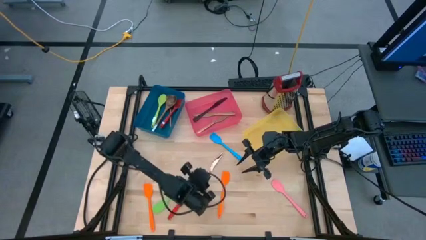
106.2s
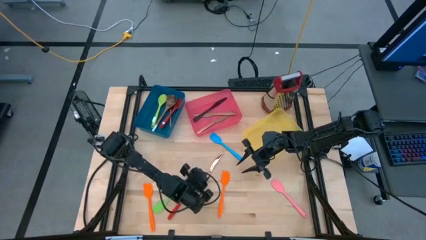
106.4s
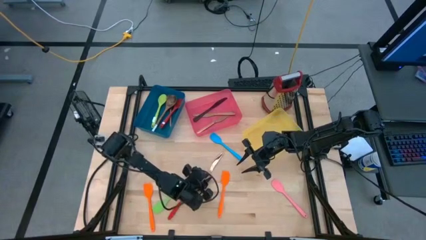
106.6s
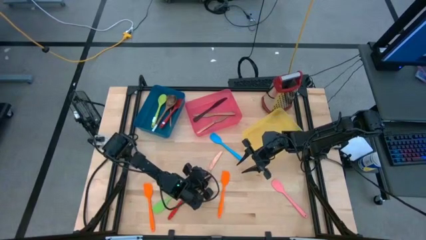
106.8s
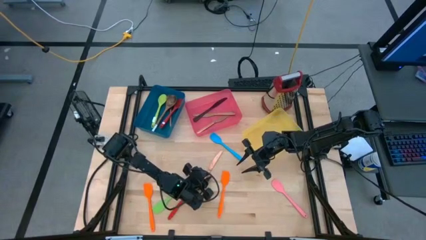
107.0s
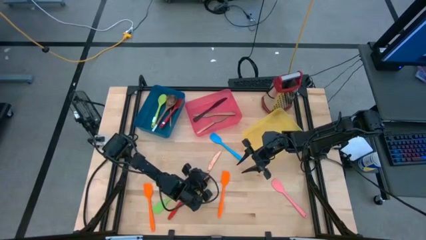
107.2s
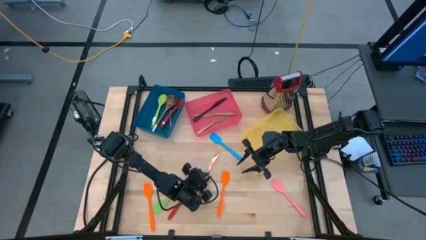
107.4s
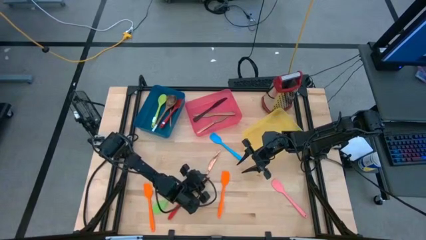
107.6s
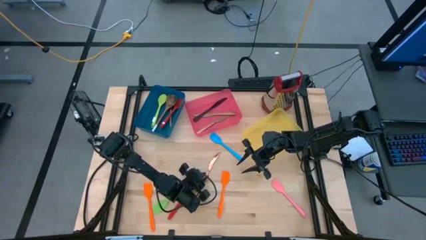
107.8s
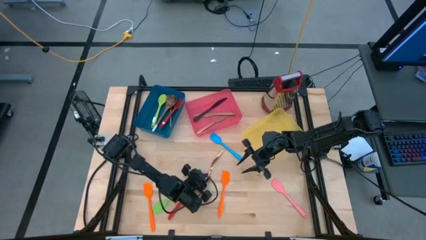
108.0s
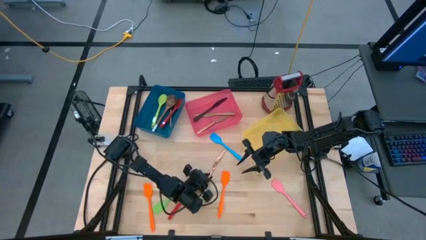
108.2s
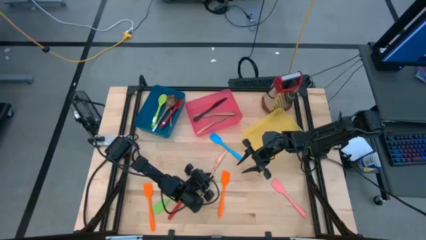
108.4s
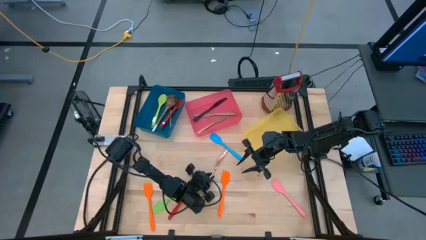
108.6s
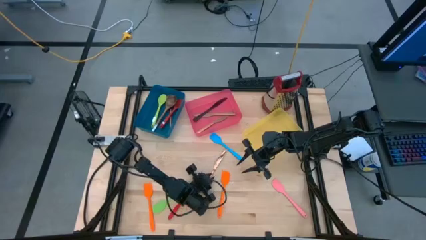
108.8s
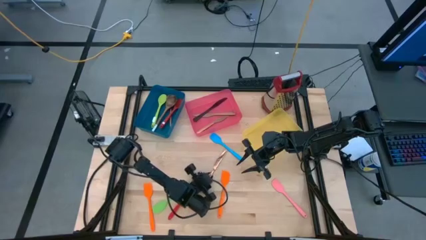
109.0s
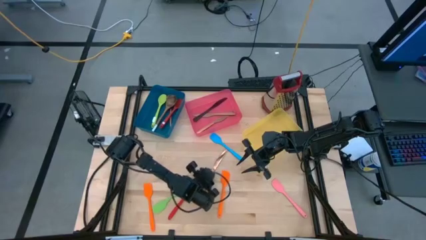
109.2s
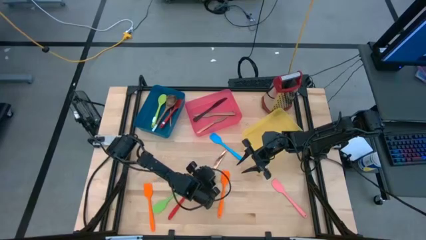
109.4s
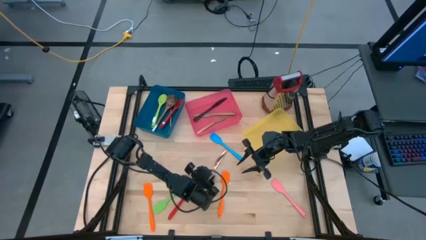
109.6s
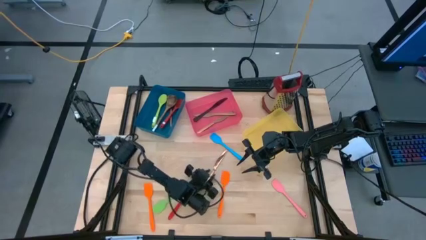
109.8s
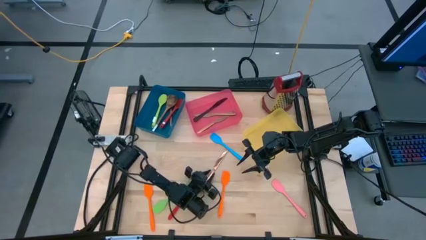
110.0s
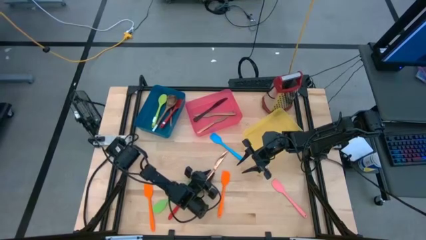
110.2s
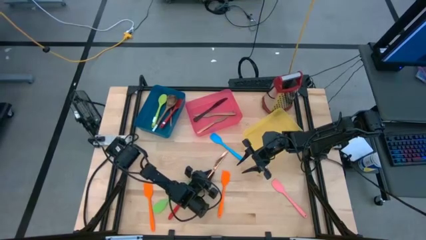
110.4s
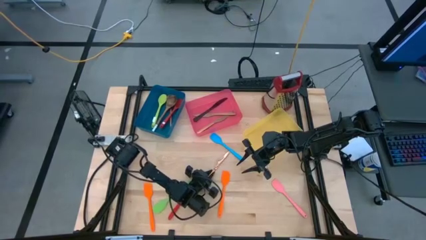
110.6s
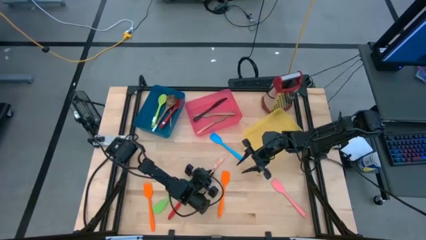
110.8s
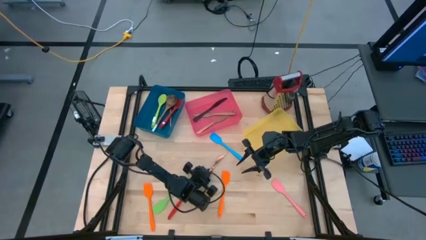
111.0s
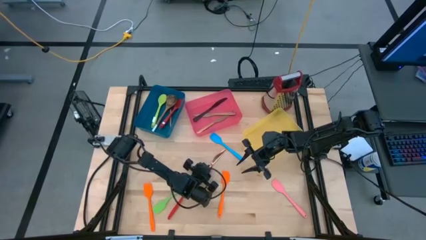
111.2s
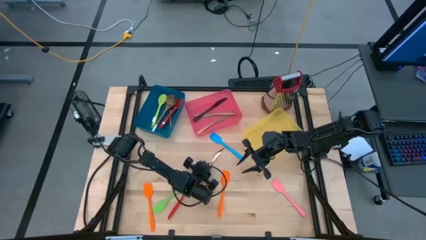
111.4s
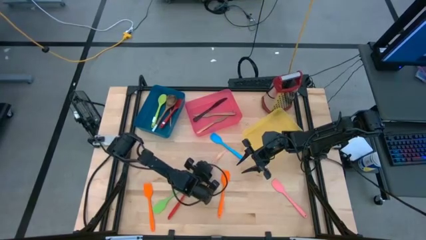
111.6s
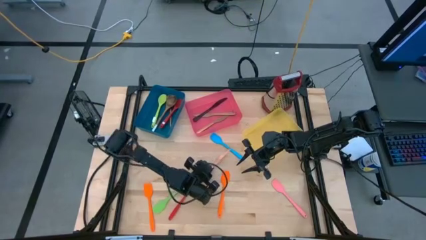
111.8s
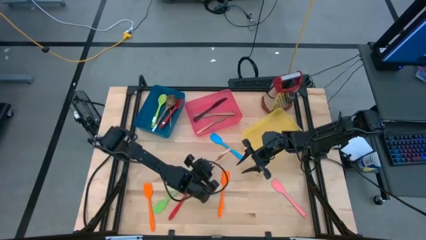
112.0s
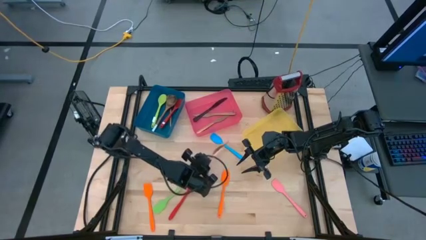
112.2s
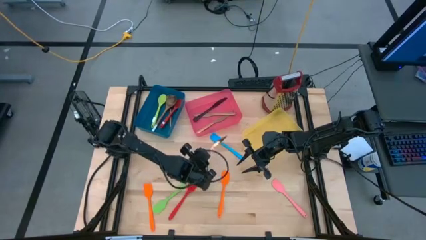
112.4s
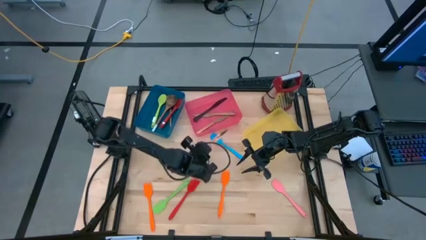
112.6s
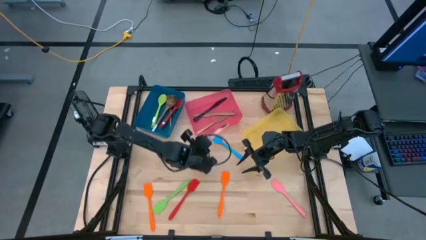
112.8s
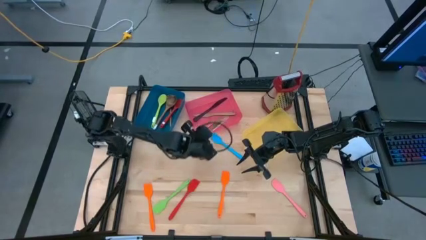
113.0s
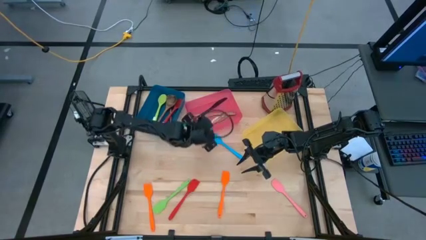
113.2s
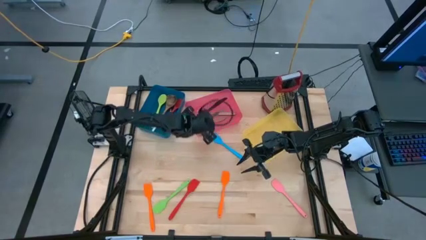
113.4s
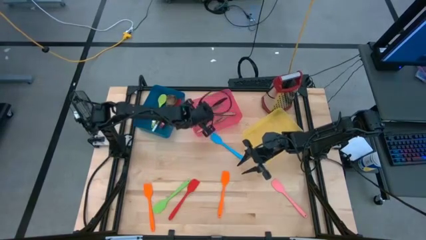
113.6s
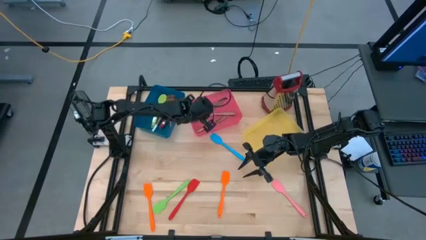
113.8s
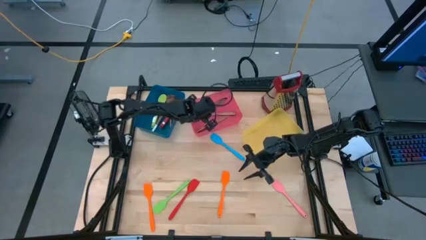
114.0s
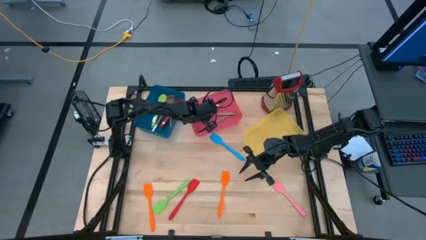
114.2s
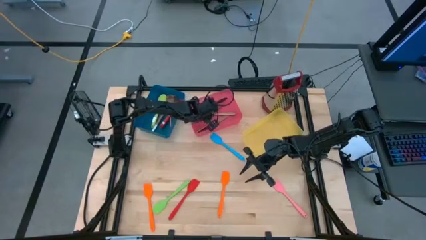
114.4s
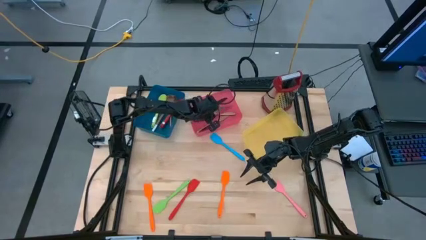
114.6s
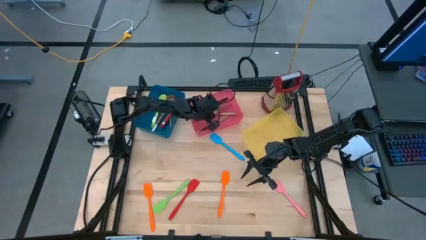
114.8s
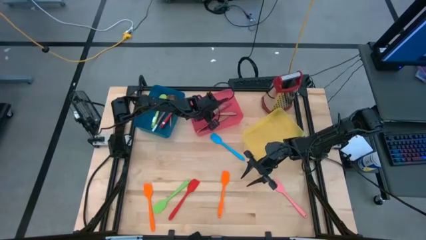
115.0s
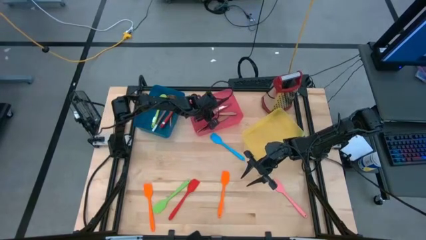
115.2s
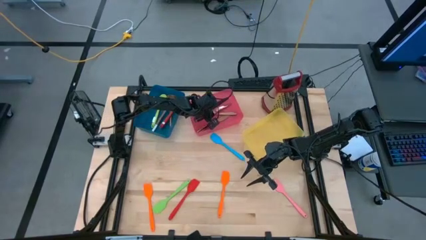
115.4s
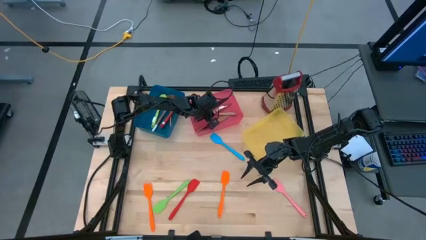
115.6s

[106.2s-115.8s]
Task: Pick & Place Kitchen Items
Put the gold knife into the pink bin

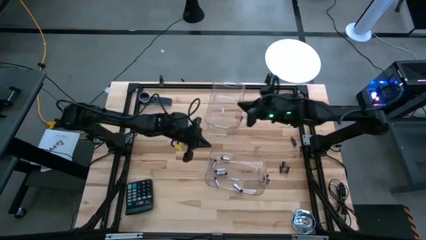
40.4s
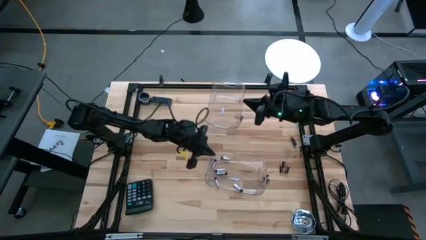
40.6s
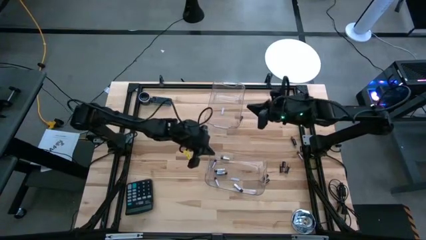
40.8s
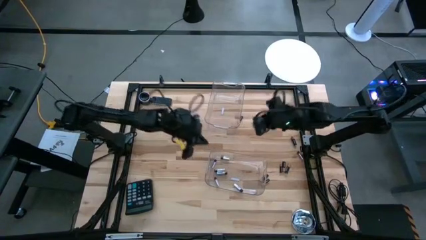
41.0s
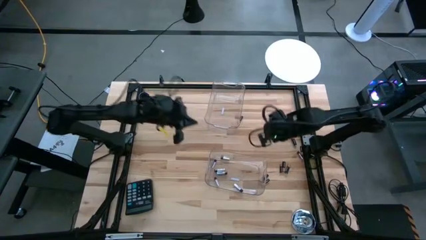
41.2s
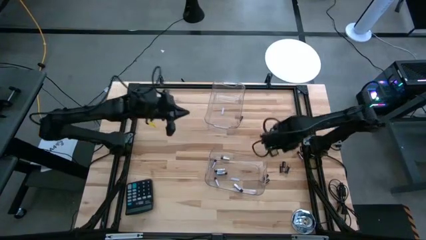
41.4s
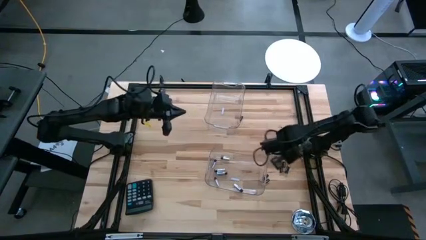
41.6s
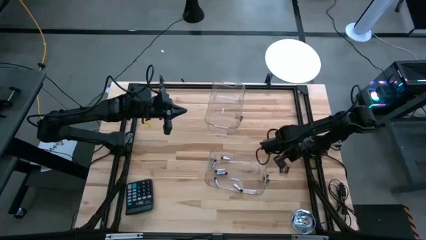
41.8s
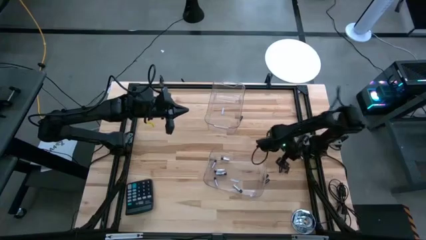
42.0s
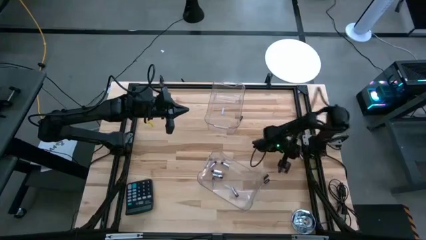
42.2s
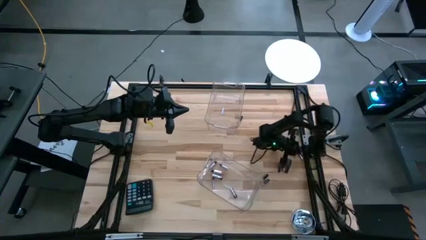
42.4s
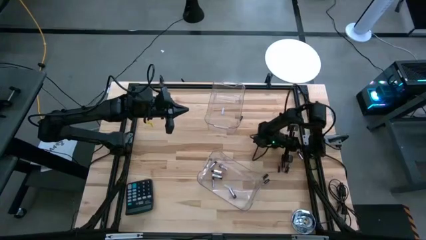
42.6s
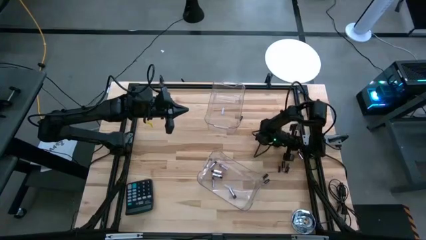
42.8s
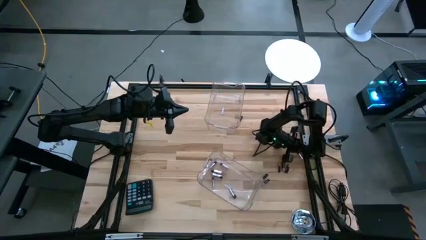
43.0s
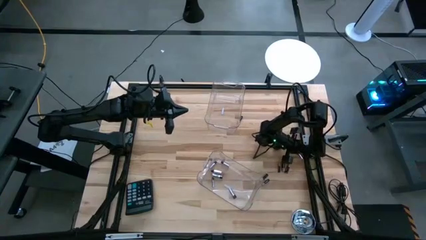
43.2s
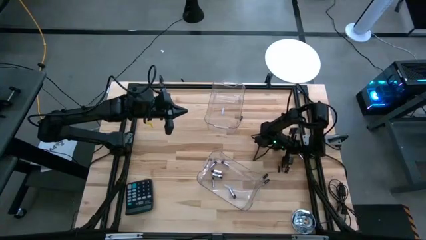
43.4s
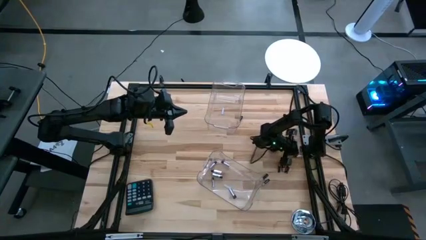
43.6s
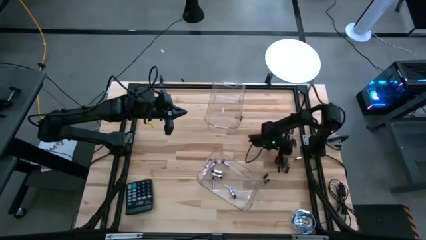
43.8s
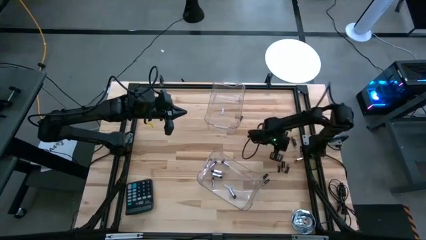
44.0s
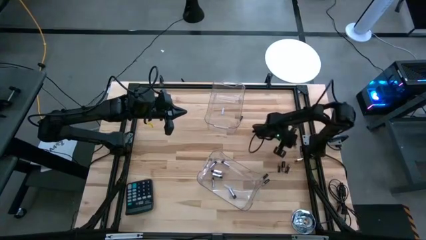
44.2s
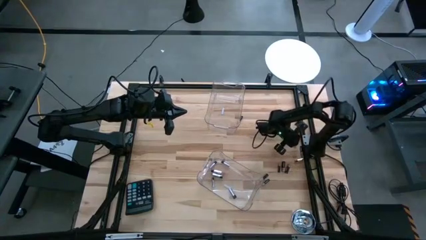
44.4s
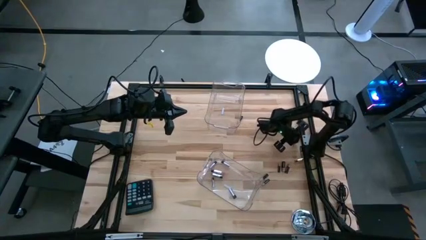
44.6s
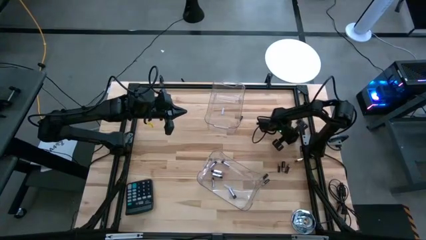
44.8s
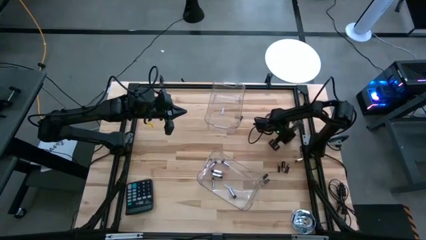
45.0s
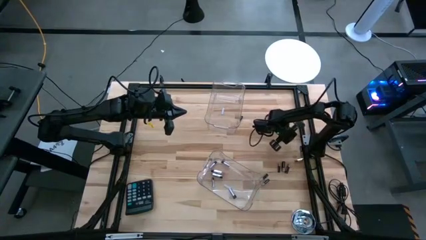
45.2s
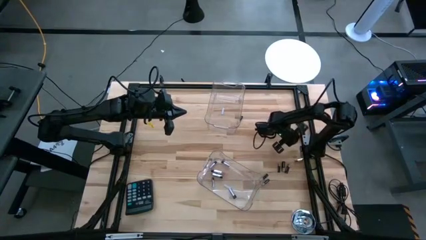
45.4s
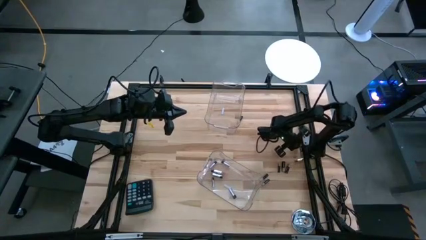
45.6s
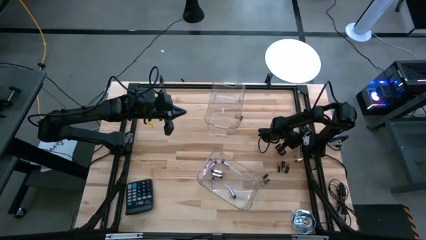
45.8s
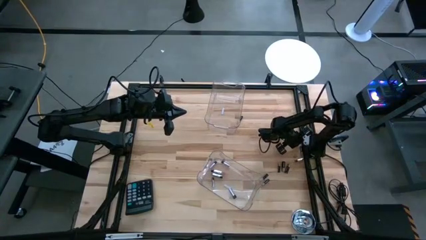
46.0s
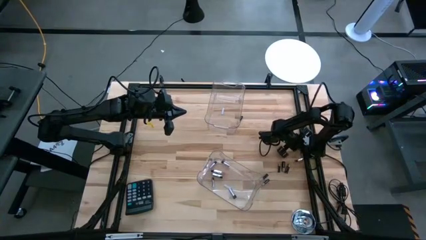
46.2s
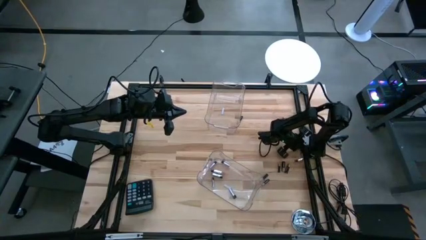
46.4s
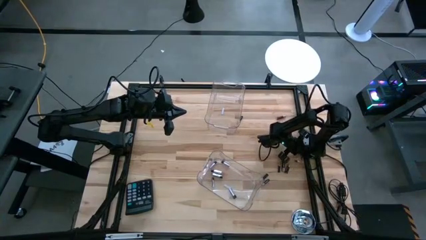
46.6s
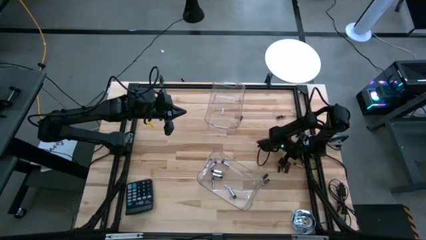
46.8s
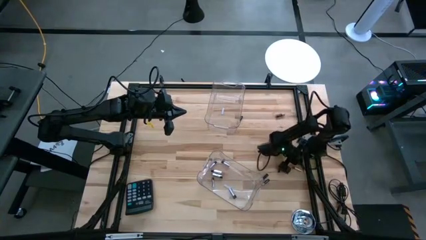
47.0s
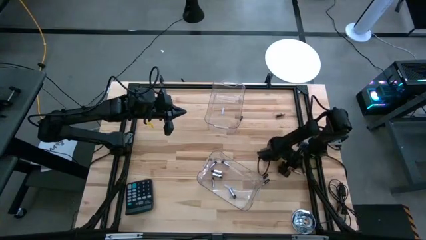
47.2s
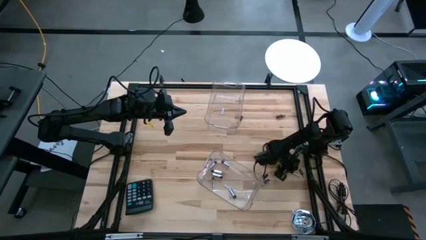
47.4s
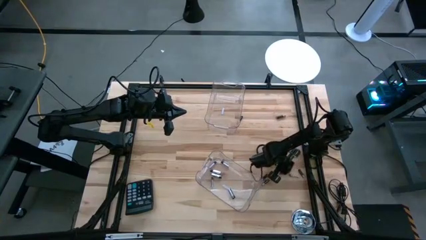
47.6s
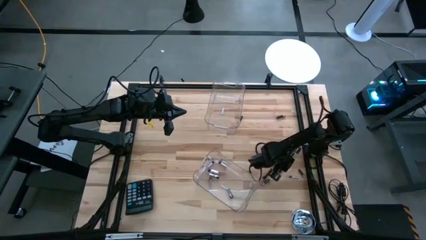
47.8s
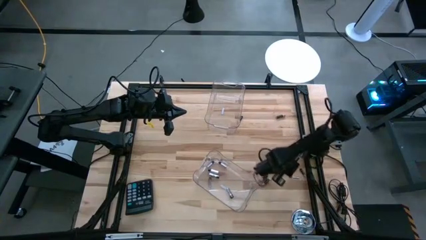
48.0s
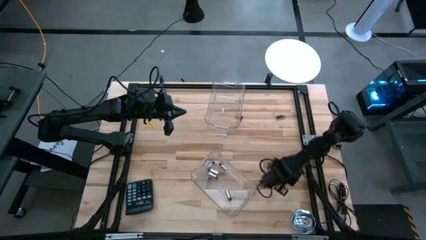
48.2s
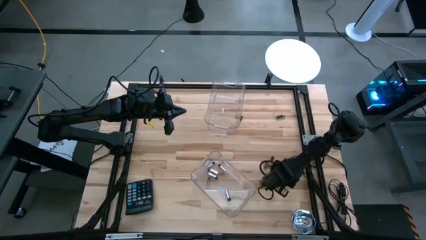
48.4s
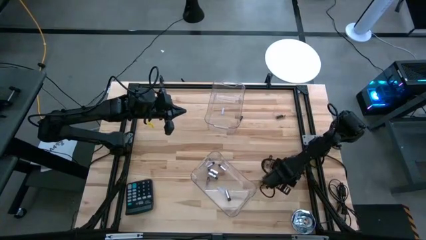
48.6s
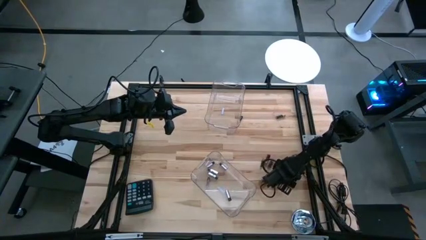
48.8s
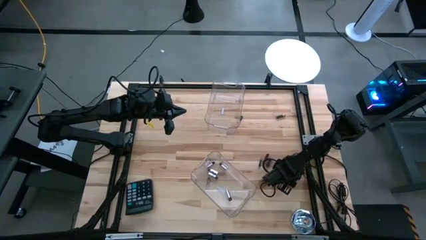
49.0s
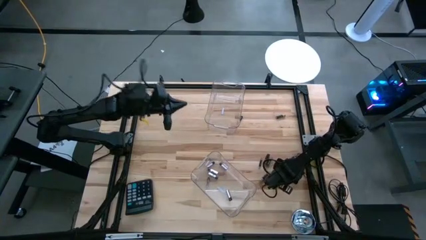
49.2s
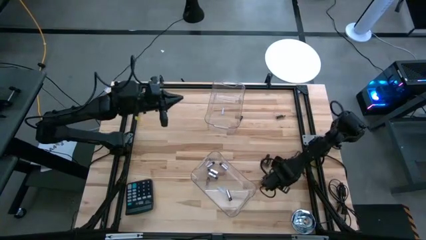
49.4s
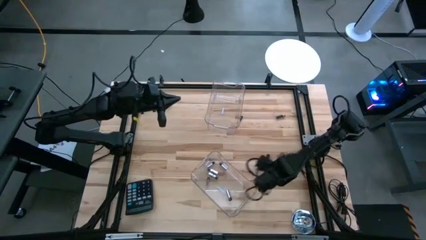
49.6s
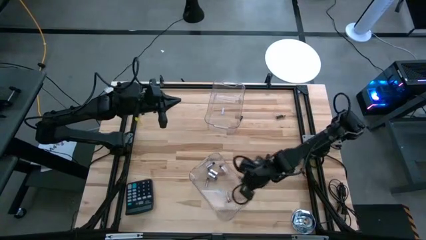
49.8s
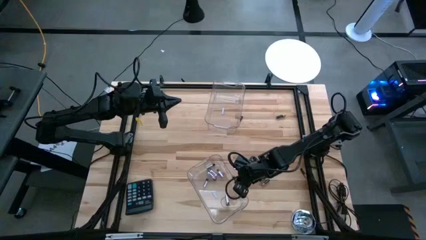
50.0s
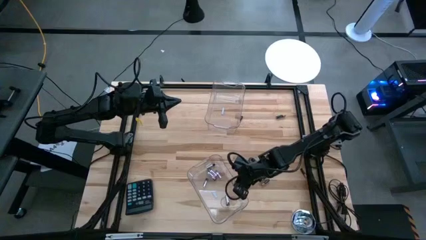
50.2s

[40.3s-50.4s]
Task: Sort batteries
Put the silver battery into the bottom transparent bin
